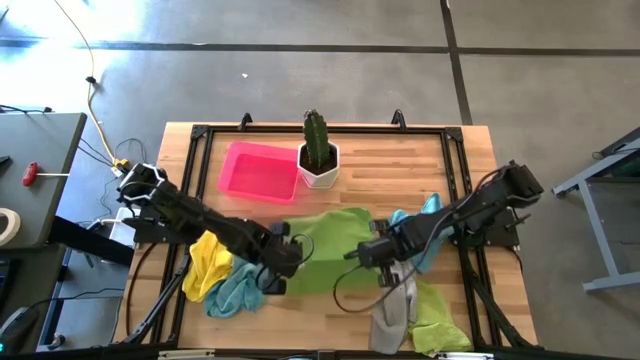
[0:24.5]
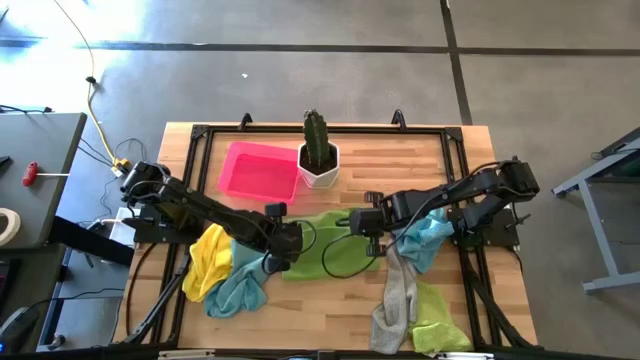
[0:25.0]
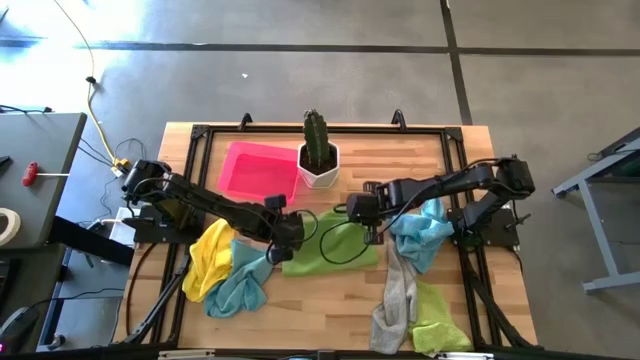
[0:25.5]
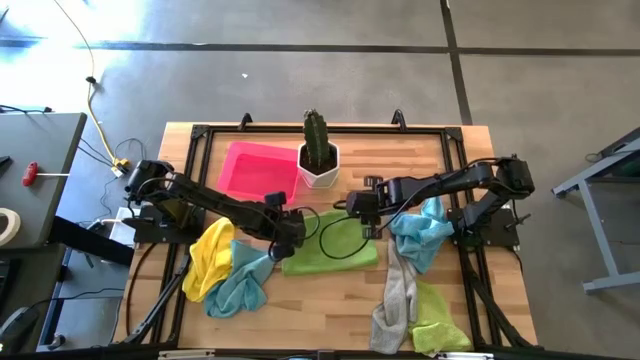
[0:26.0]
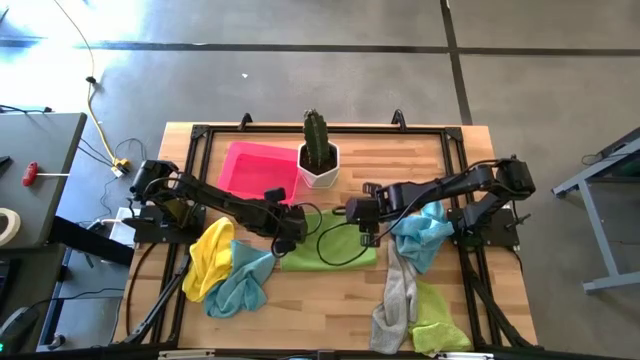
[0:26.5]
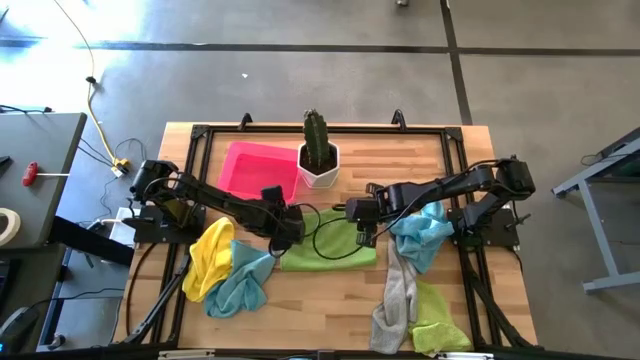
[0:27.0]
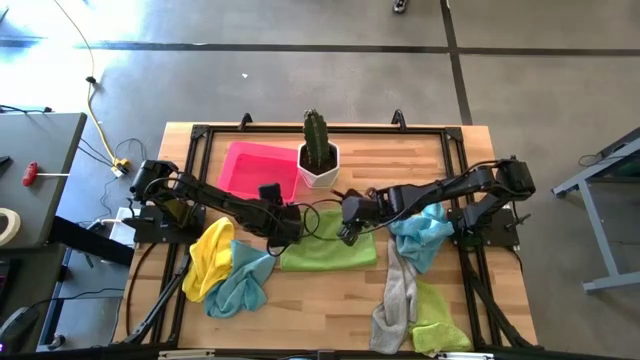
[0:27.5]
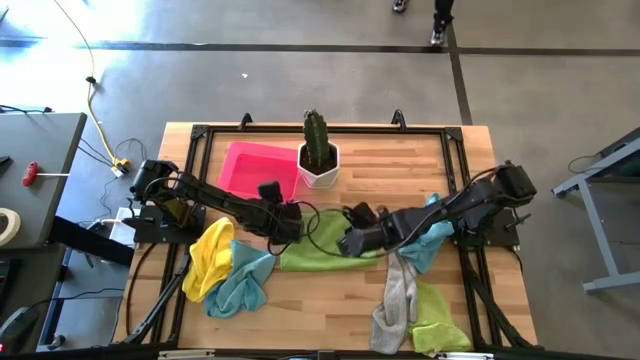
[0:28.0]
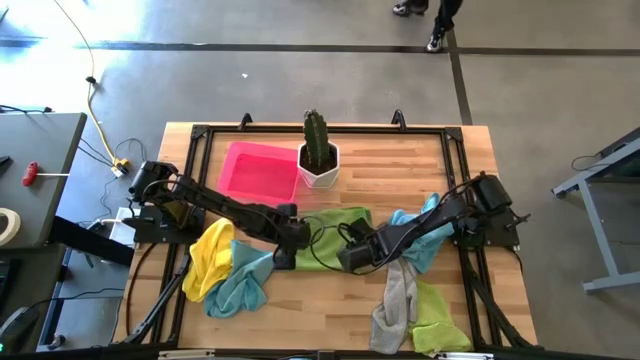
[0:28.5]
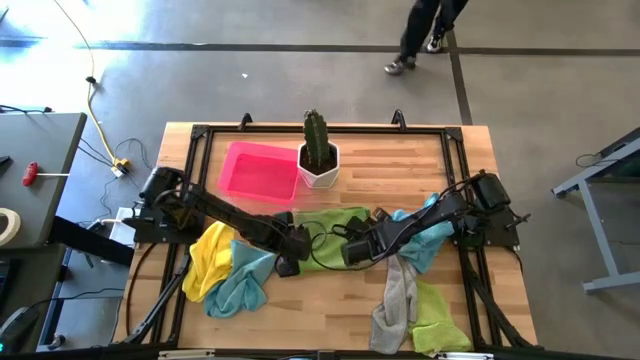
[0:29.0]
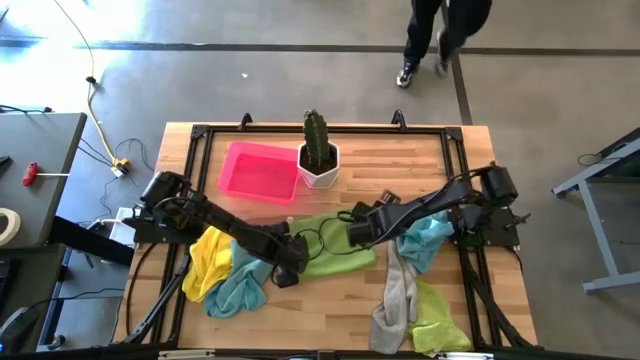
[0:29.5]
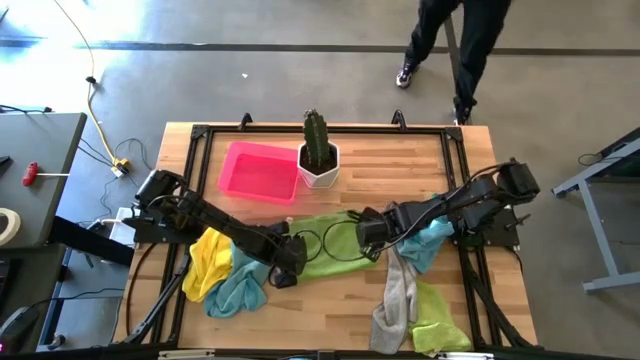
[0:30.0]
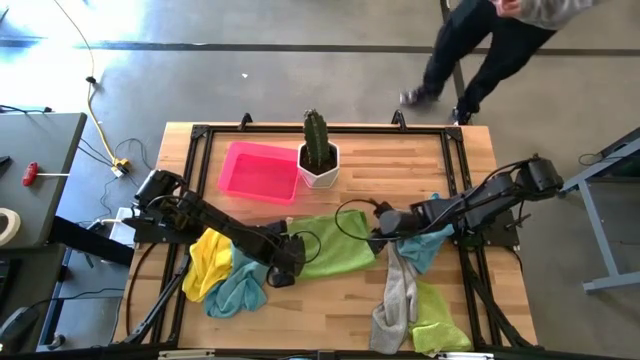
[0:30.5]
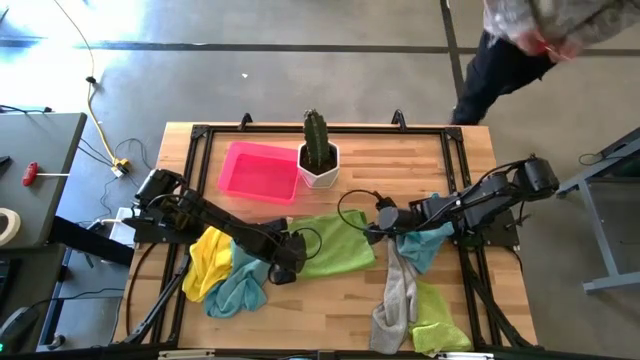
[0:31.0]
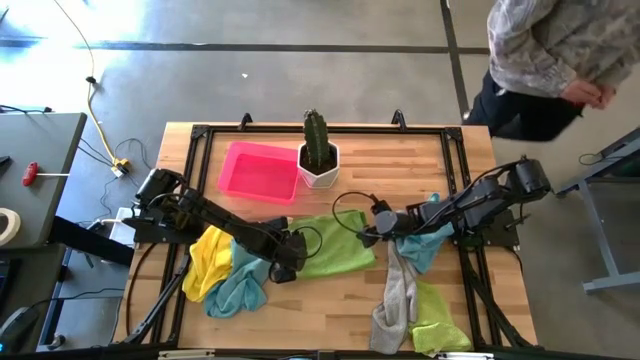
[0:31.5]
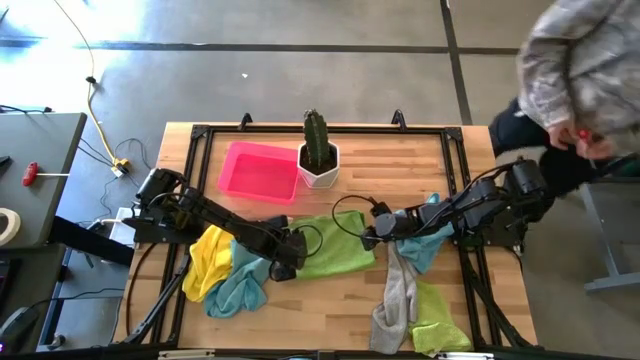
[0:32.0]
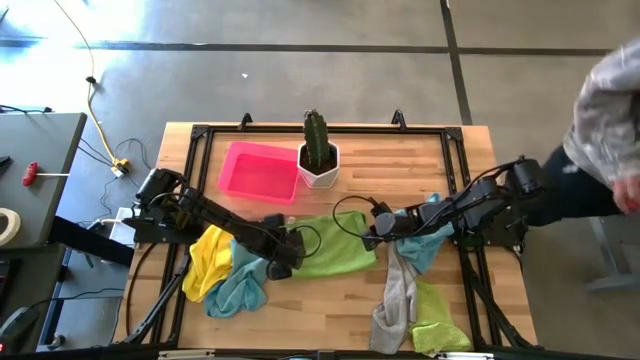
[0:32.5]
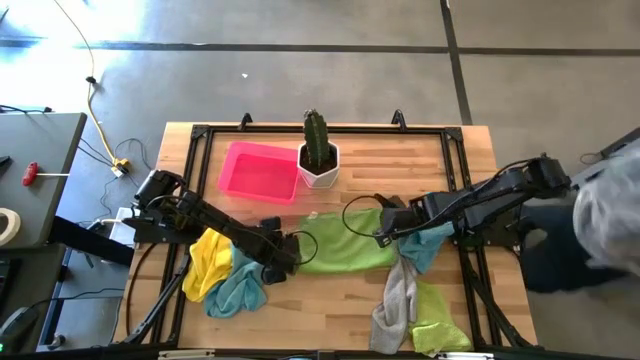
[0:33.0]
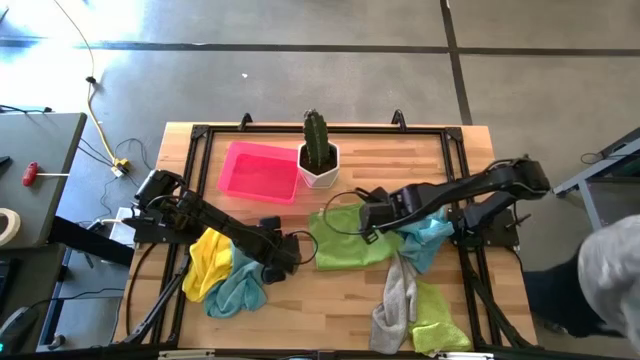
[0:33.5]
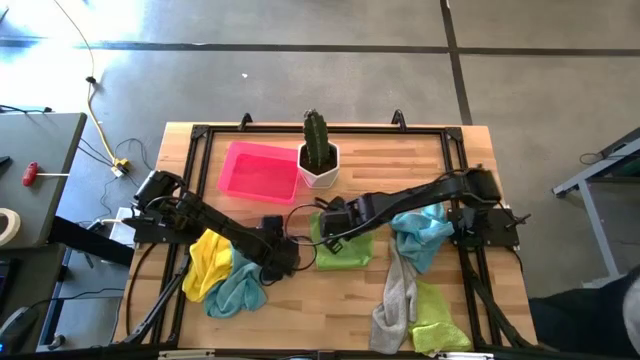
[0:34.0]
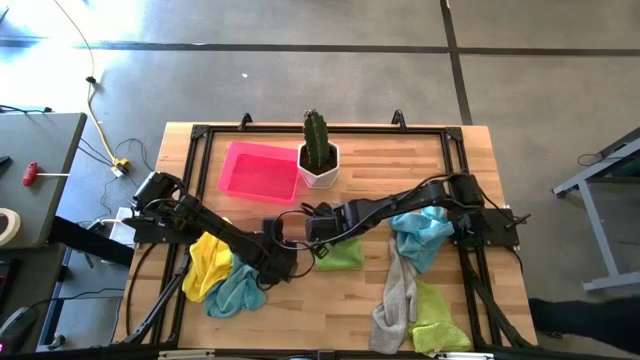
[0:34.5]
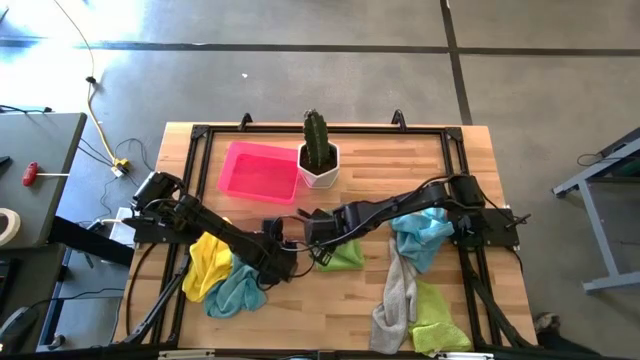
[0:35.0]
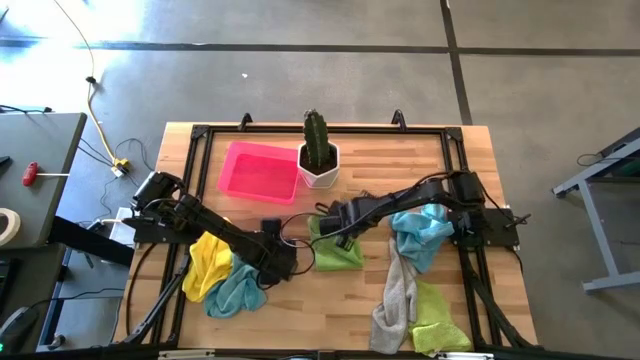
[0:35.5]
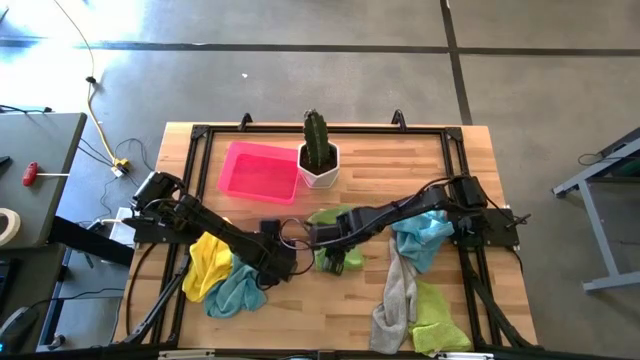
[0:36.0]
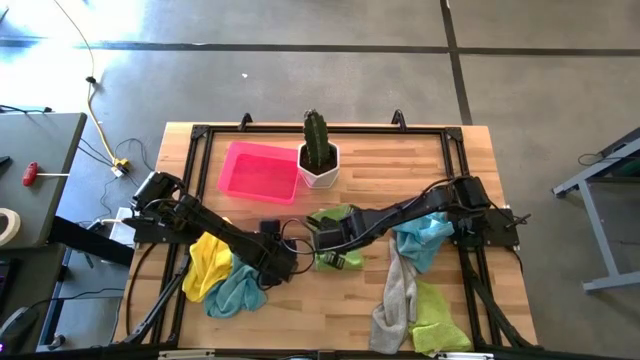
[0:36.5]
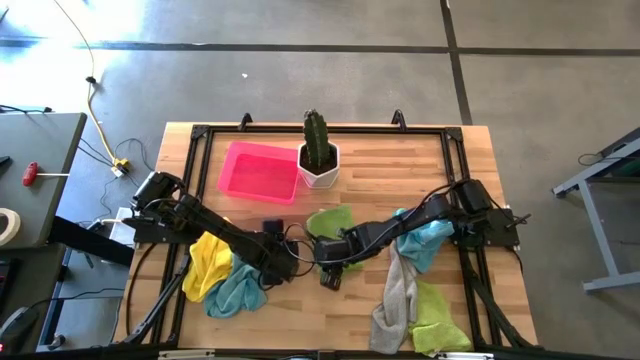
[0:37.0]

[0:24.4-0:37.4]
Task: Fold microfiber towels
Fold the green microfiber towel

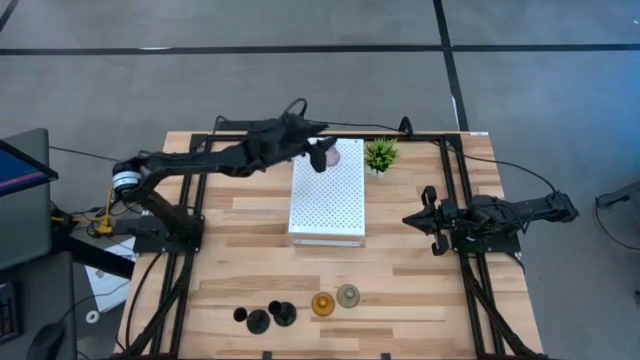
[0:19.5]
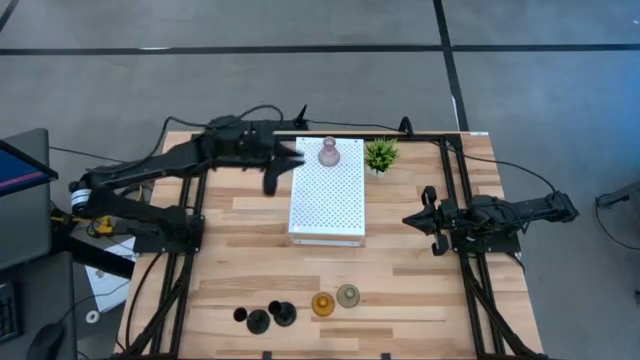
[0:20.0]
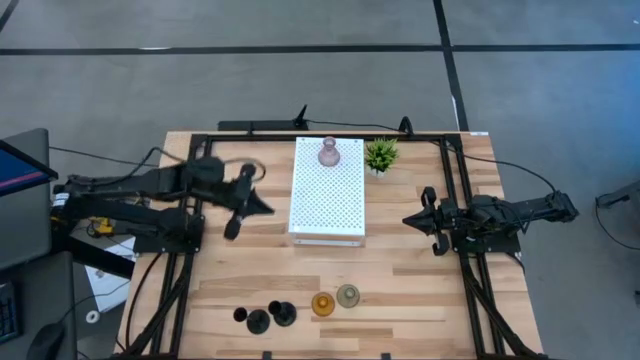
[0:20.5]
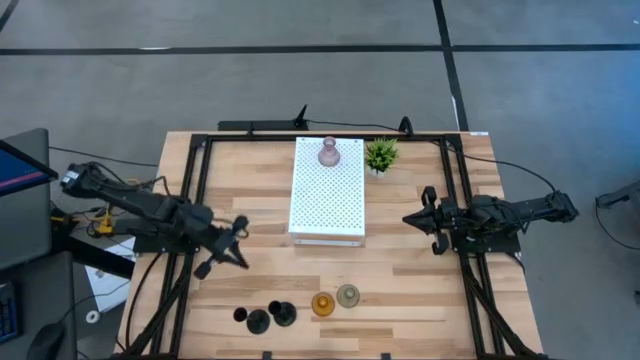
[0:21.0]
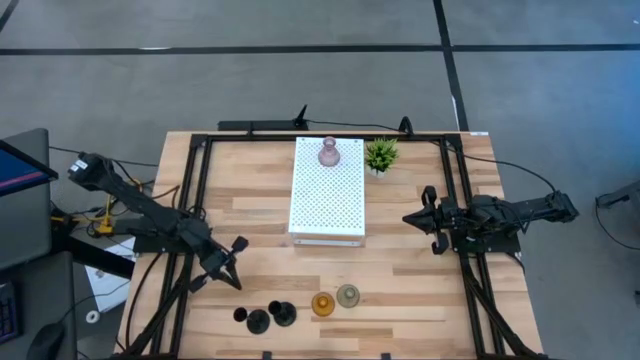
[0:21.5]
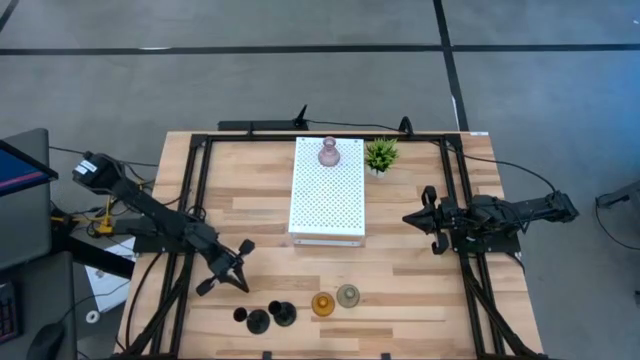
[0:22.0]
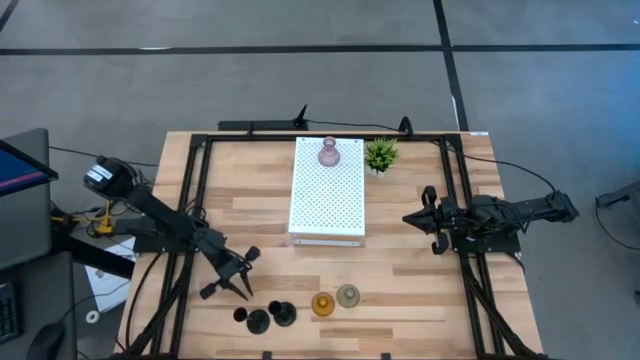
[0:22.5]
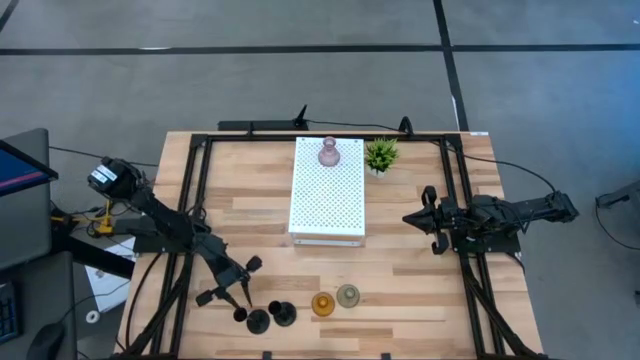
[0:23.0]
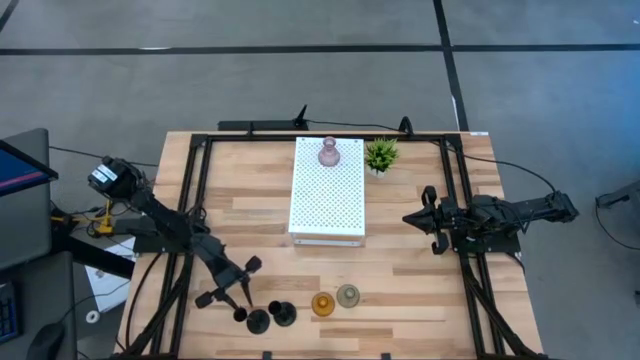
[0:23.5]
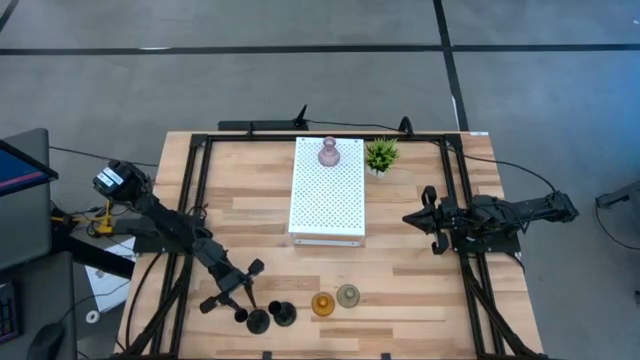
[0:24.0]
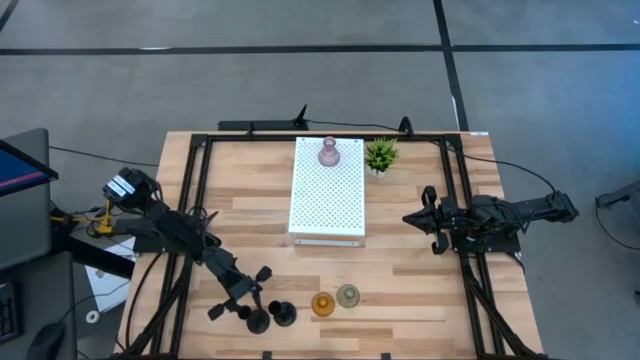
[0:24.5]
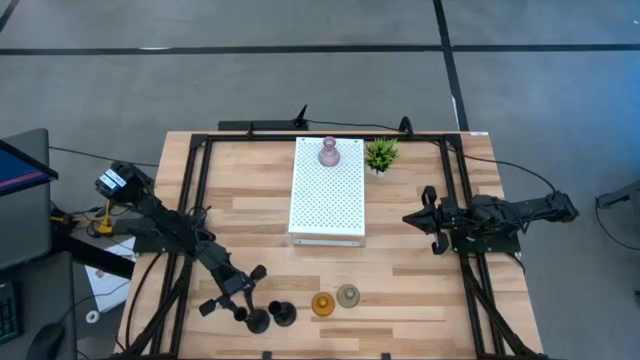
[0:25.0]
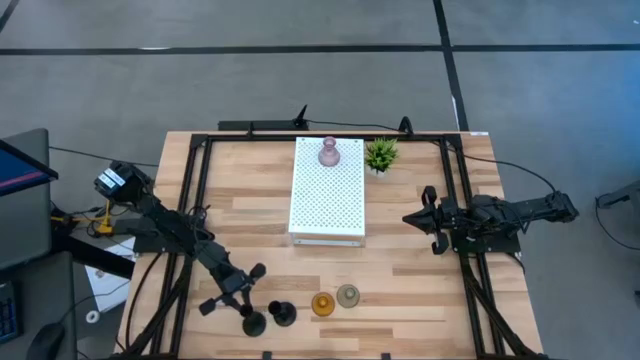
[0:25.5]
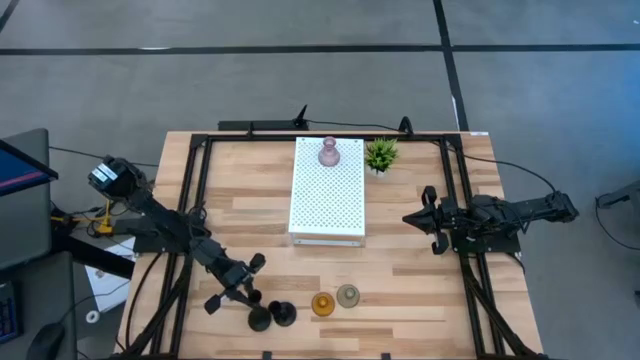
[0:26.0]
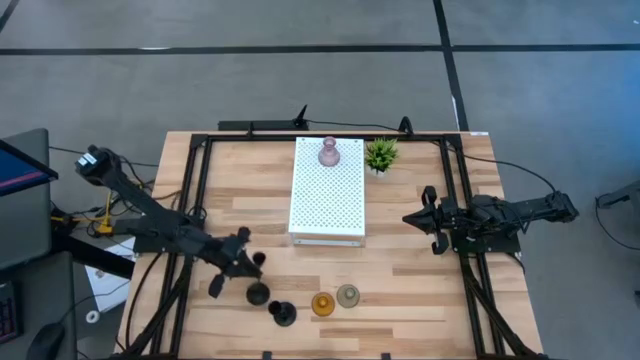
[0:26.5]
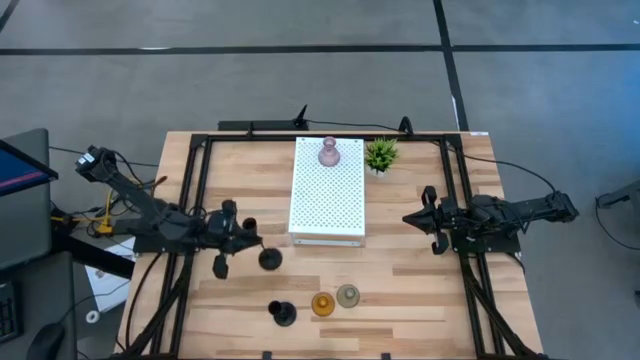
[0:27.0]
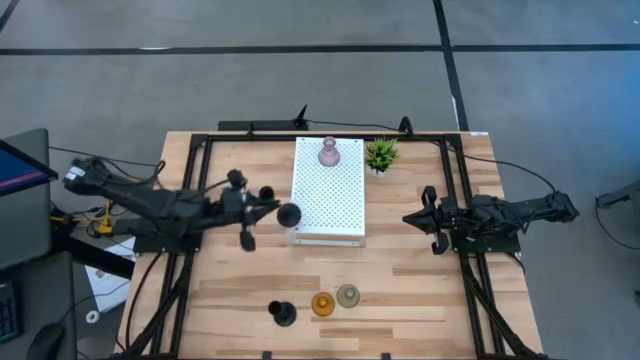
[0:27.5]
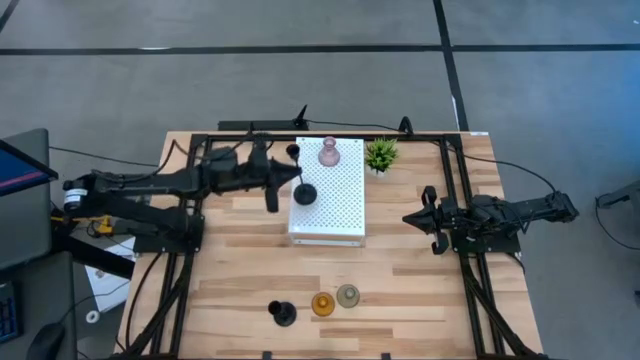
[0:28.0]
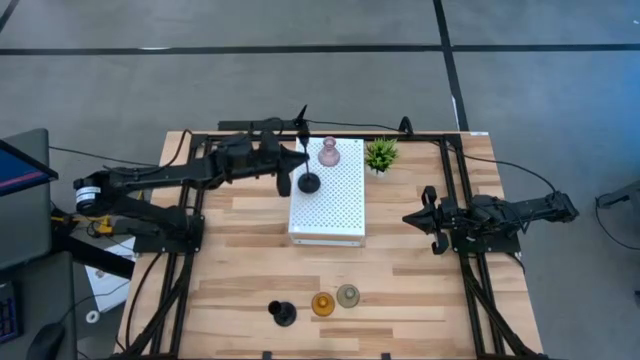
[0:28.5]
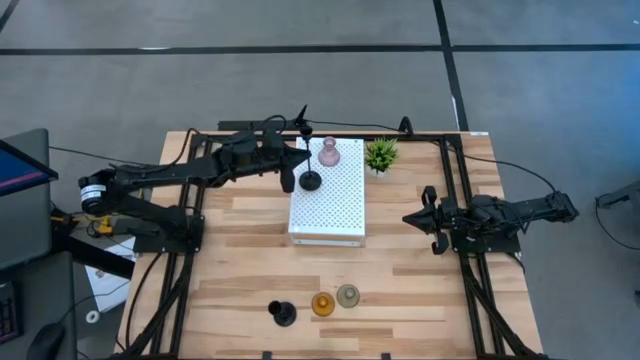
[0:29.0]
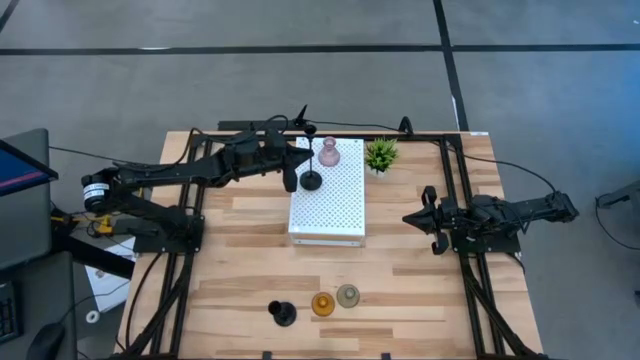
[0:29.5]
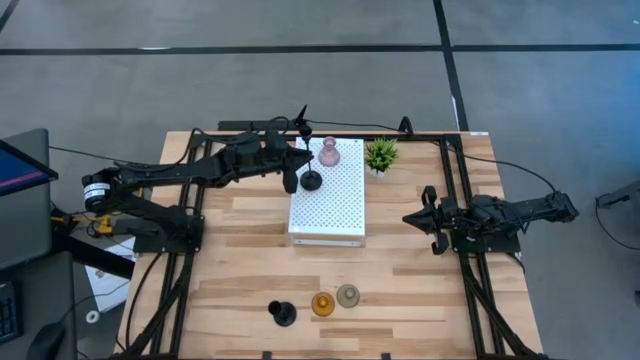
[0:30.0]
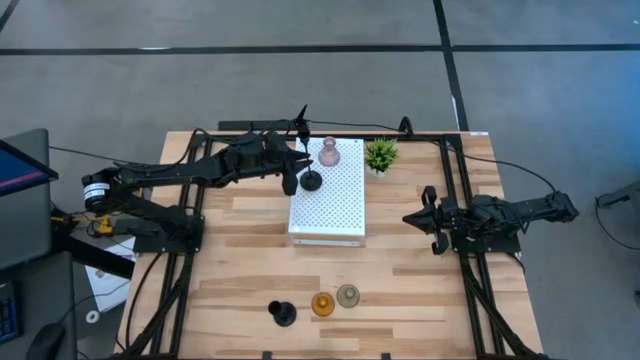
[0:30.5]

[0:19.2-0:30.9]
Task: Pick & Place candle stick holders
Put the left black candle holder on the shelf
